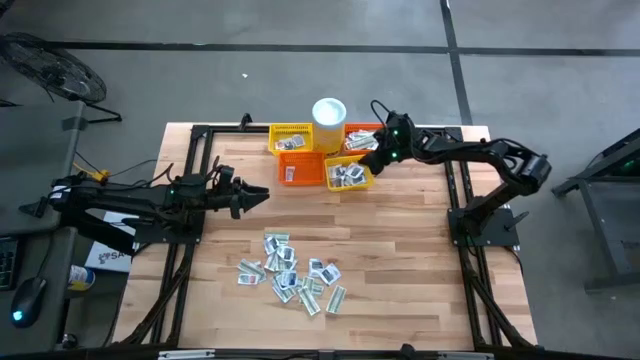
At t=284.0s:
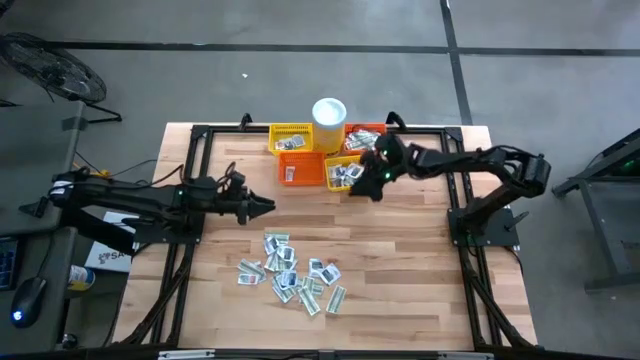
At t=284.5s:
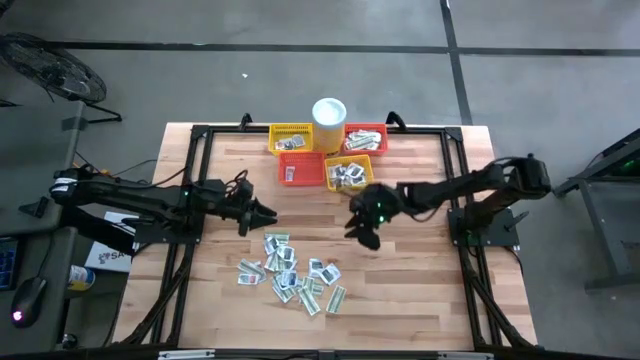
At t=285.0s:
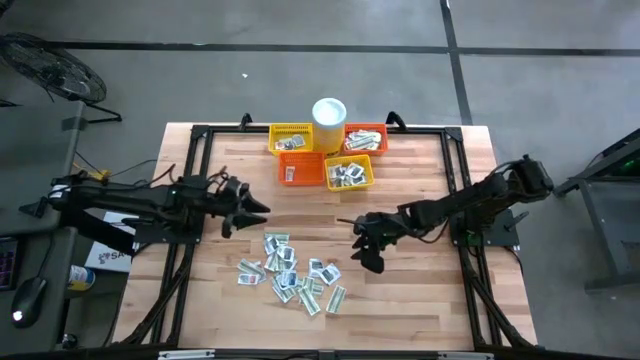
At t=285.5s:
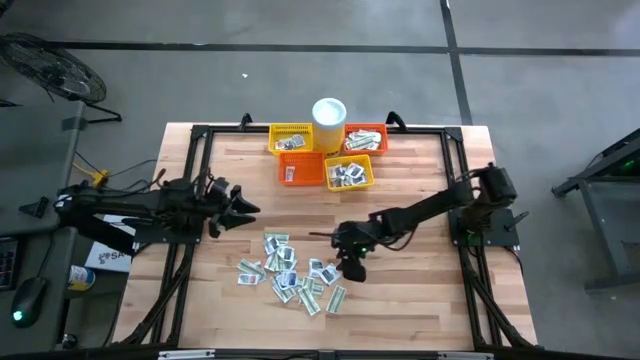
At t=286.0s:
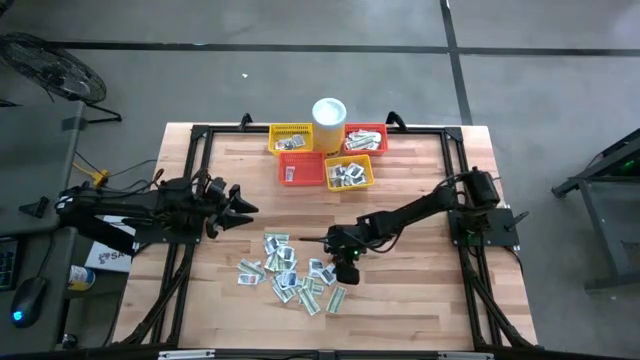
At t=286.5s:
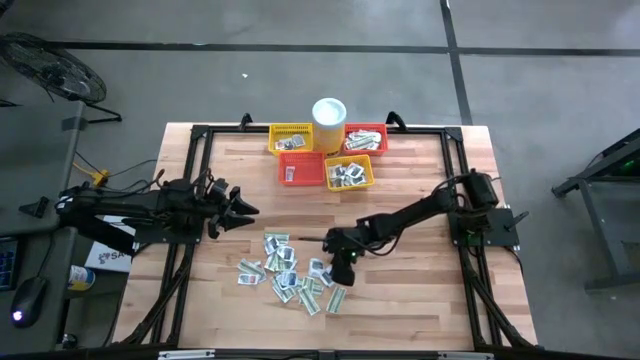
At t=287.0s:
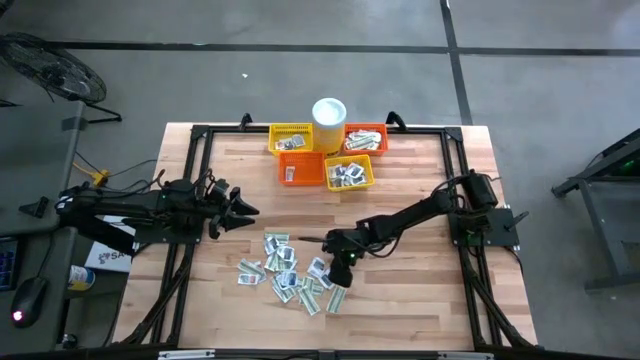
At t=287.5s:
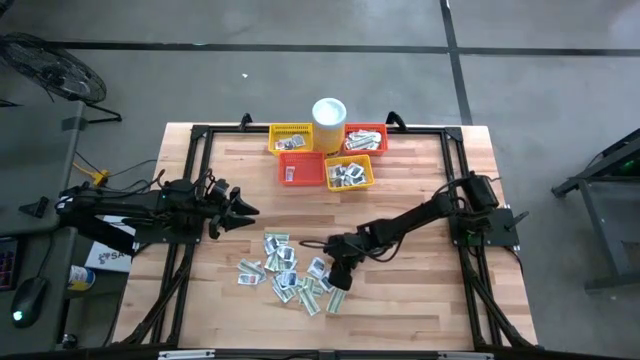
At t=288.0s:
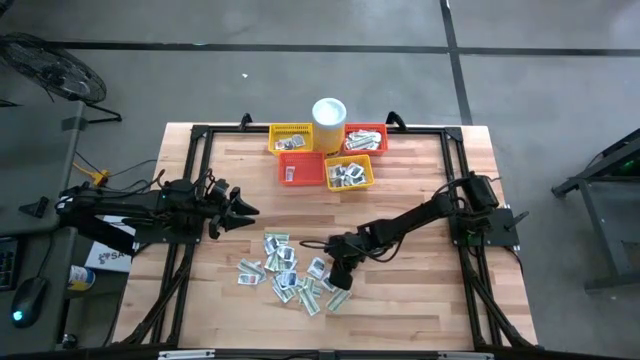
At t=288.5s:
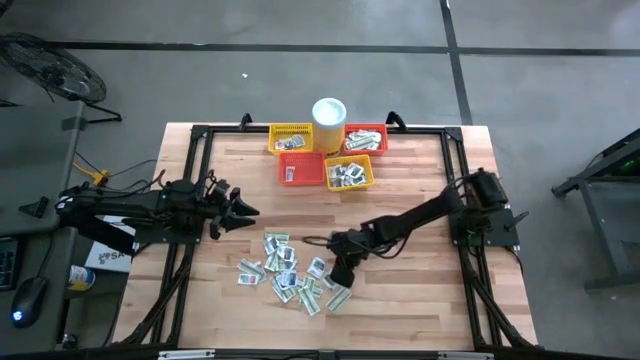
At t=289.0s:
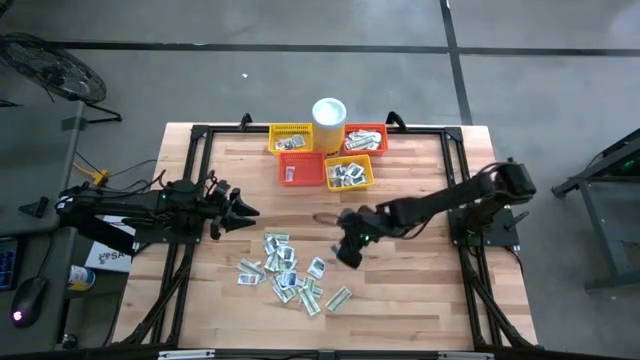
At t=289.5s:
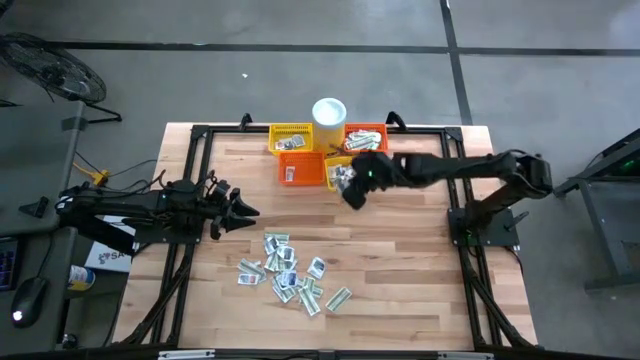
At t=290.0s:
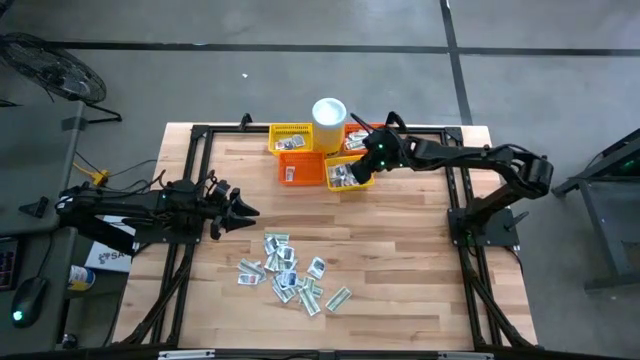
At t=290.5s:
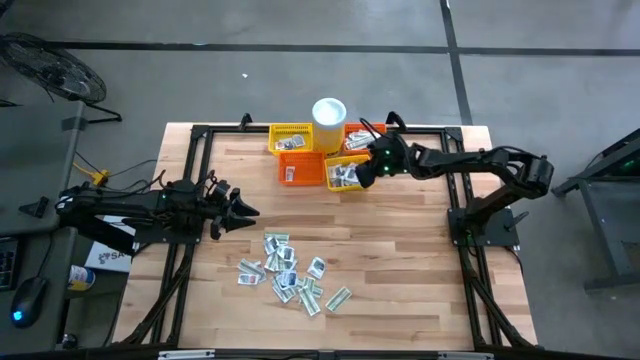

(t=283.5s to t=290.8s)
Task: Pick & Place First Aid Supplies
Put the black towelette pack into the bottom yellow basket

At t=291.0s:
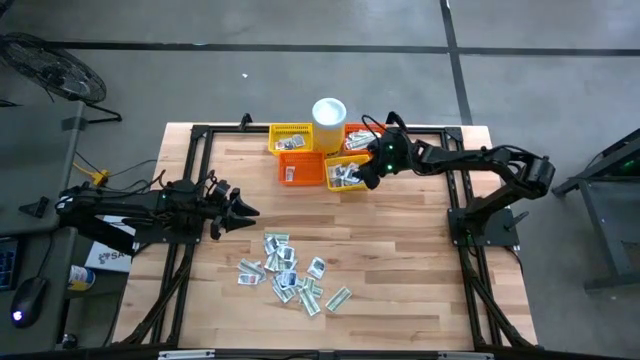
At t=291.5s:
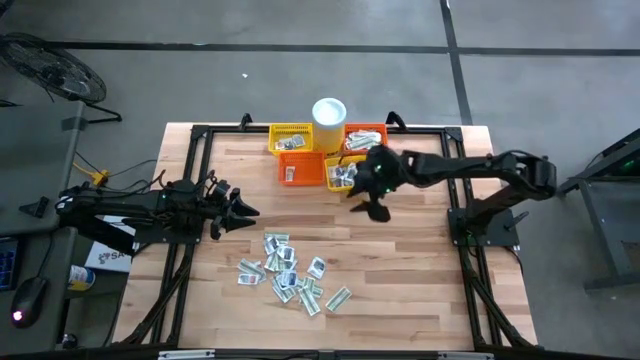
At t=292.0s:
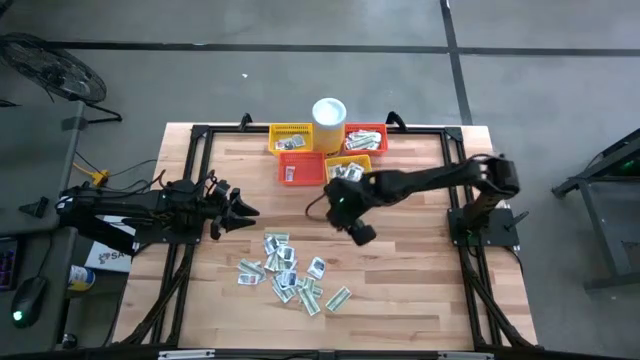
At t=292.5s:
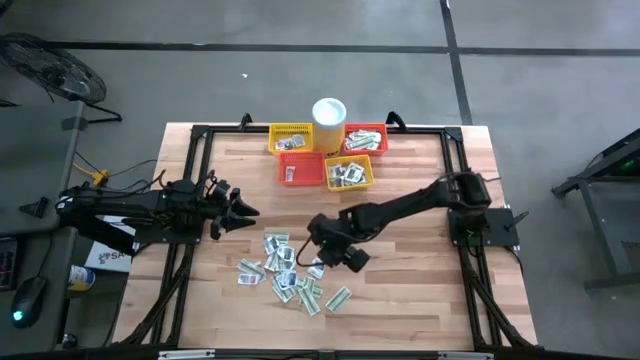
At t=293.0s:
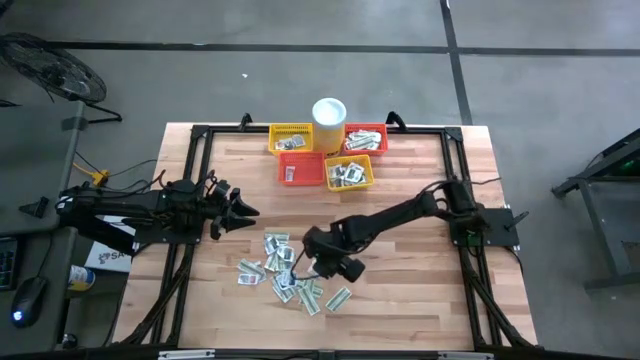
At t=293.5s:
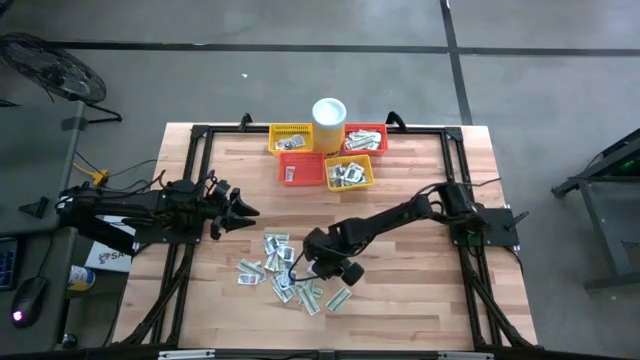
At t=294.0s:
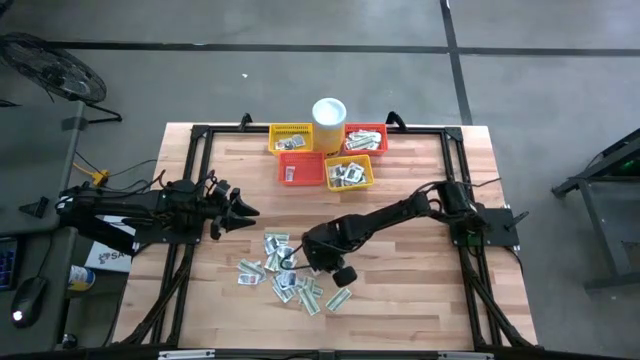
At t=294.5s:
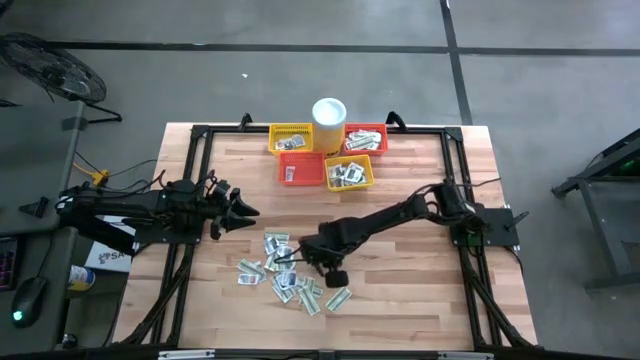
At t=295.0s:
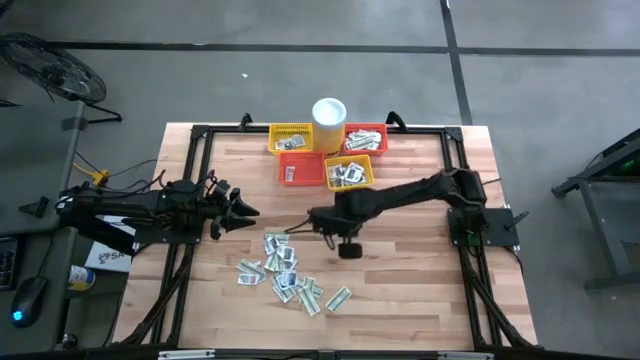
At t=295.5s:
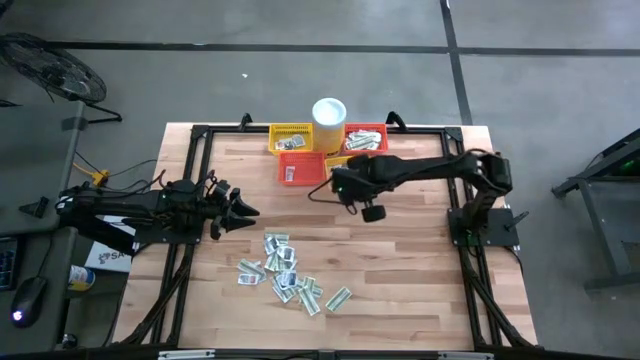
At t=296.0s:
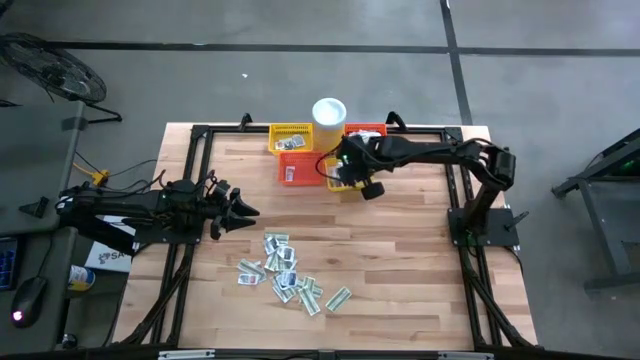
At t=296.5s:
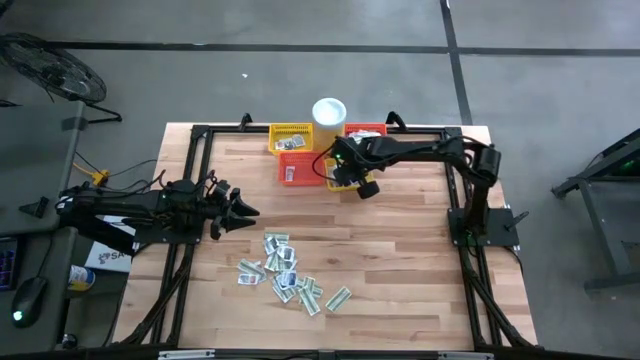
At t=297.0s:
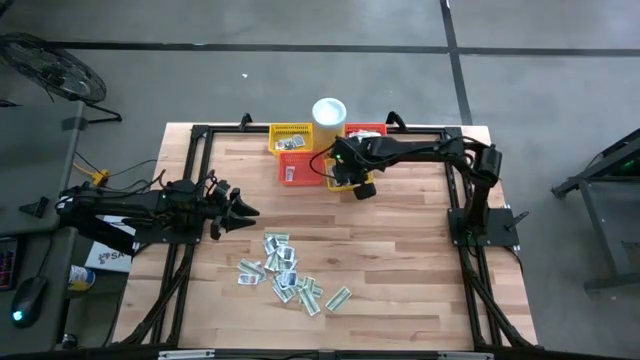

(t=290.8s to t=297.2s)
Put the black towelette pack into the bottom yellow basket

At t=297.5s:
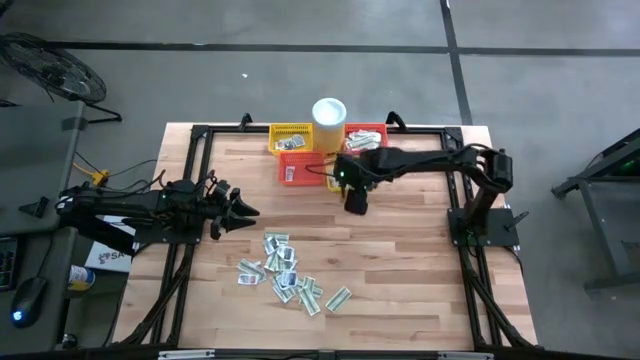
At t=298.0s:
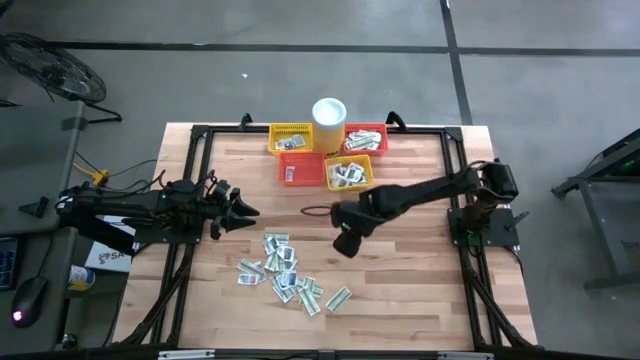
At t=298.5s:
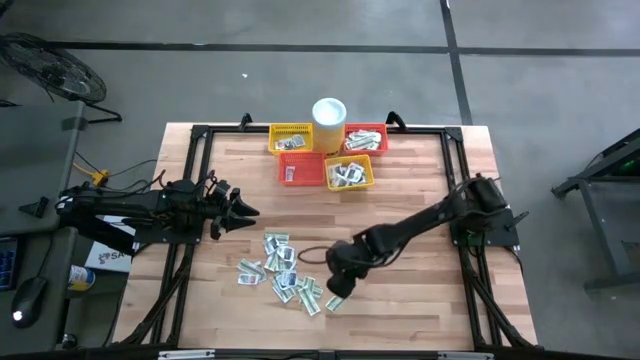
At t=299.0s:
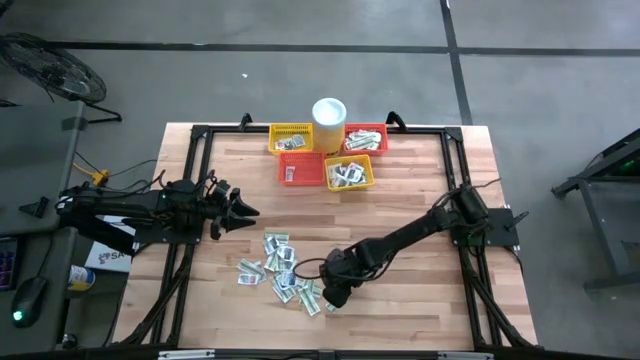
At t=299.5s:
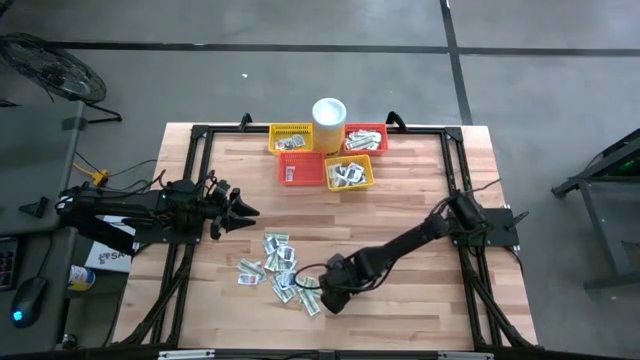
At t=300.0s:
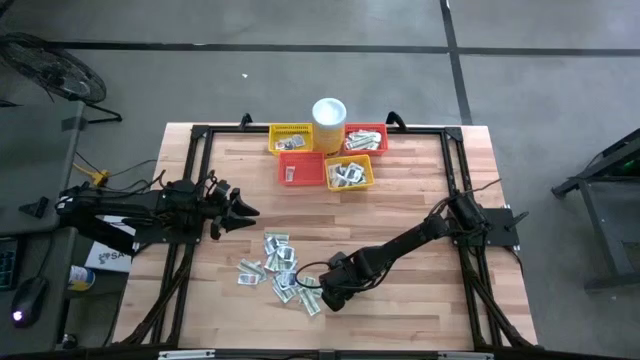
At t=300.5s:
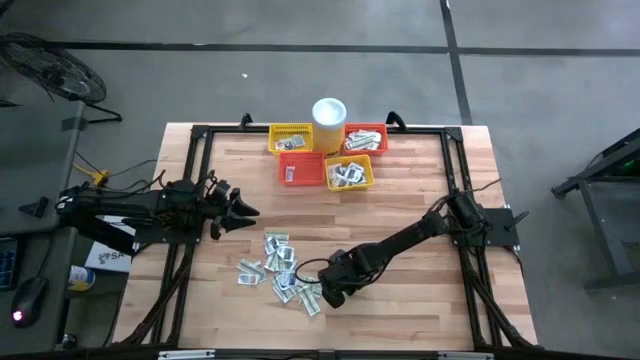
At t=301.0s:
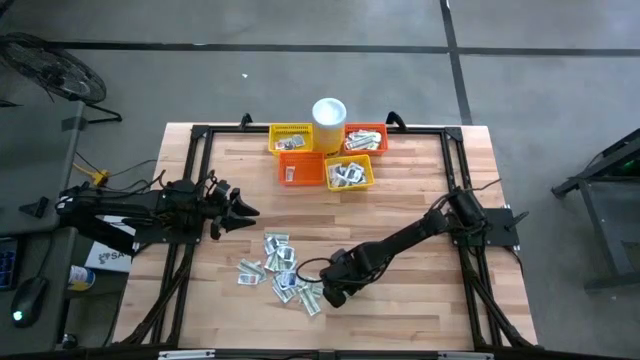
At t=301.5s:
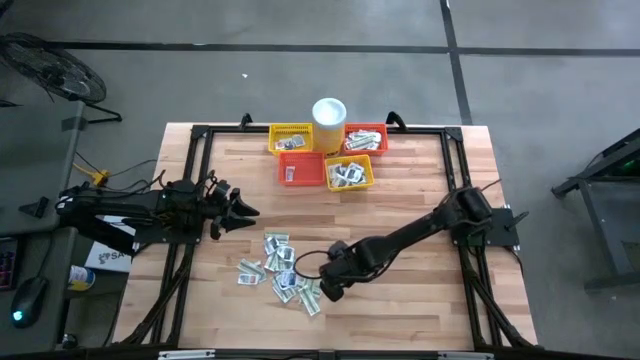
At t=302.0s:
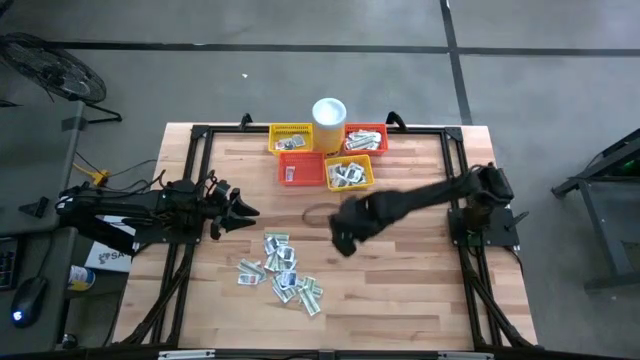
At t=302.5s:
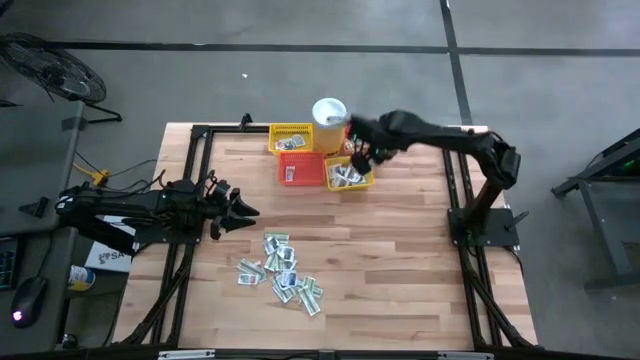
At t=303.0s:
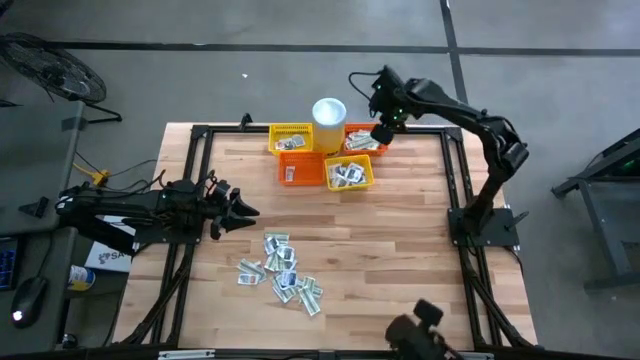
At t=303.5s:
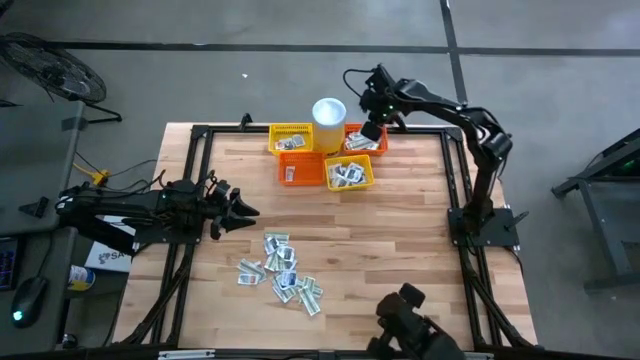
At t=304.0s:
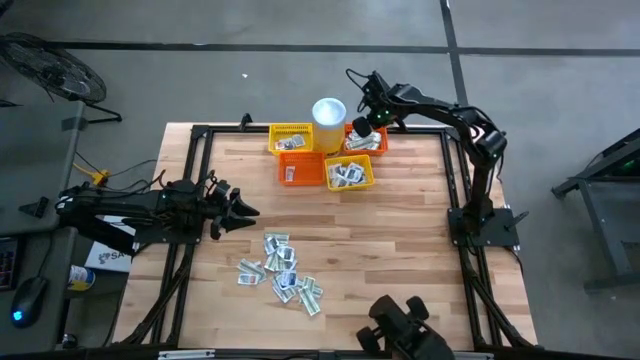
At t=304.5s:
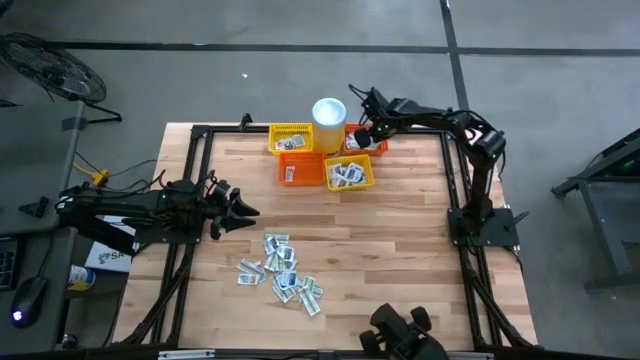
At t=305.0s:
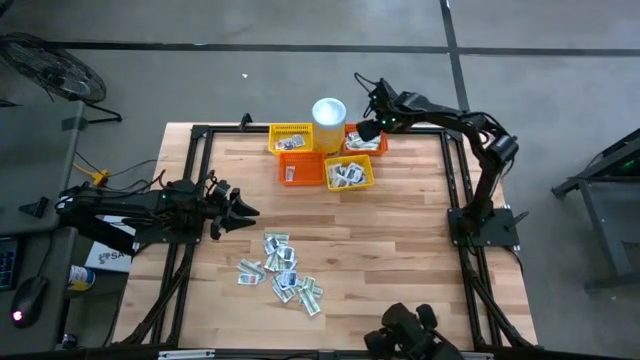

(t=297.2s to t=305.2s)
Put the green bandage pack into the top orange basket
